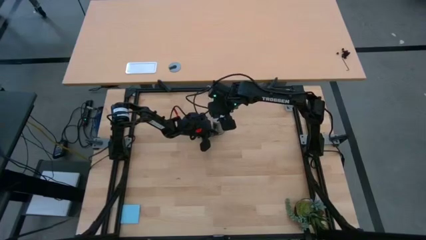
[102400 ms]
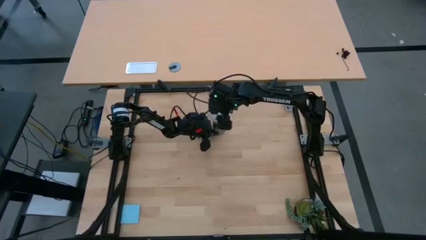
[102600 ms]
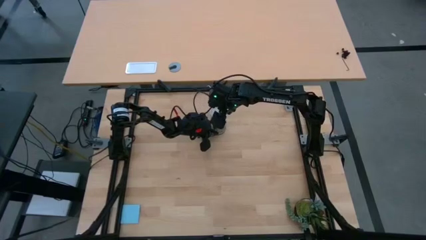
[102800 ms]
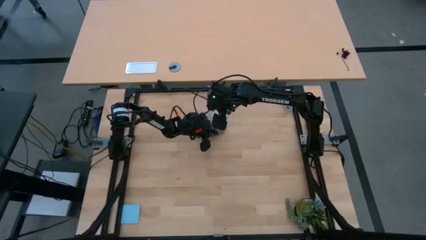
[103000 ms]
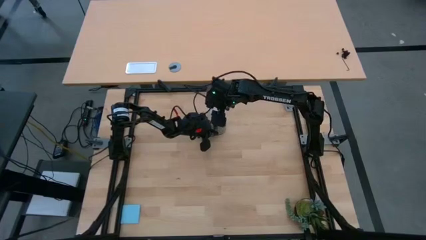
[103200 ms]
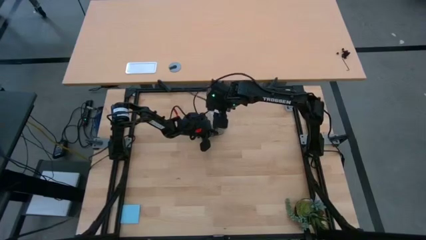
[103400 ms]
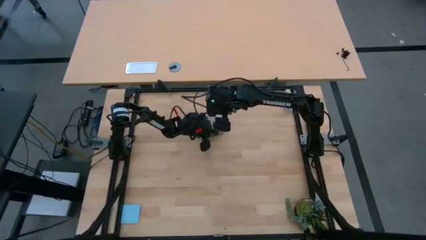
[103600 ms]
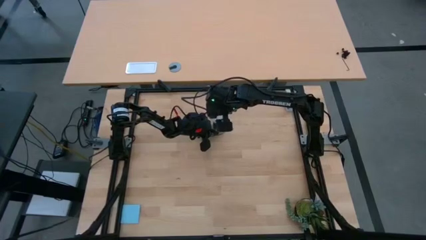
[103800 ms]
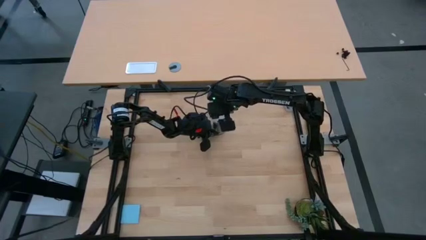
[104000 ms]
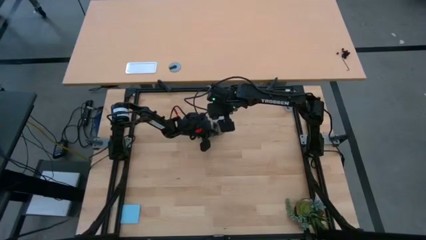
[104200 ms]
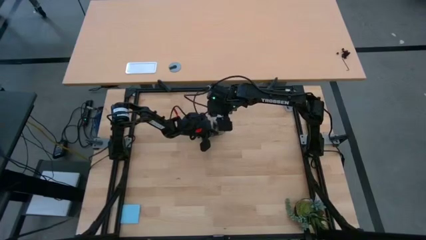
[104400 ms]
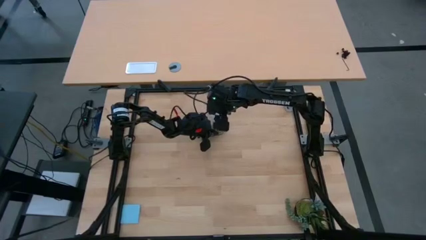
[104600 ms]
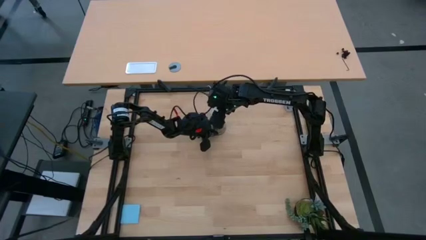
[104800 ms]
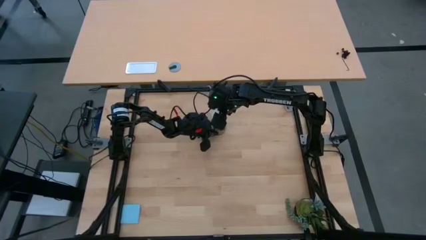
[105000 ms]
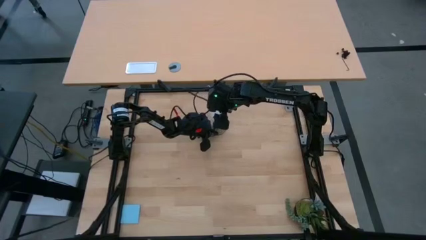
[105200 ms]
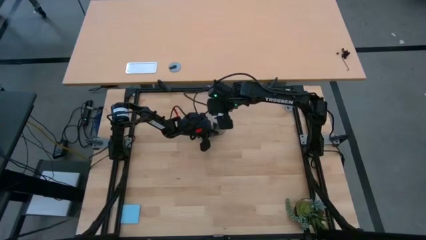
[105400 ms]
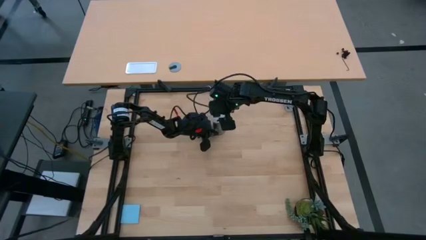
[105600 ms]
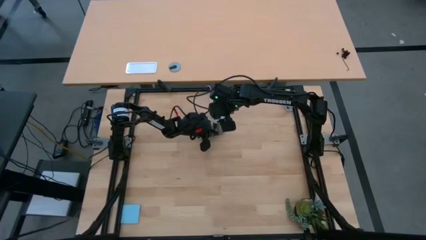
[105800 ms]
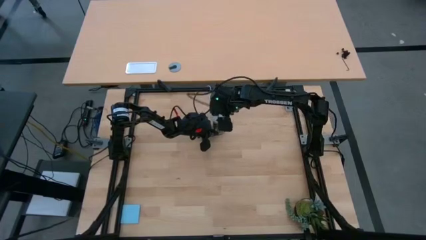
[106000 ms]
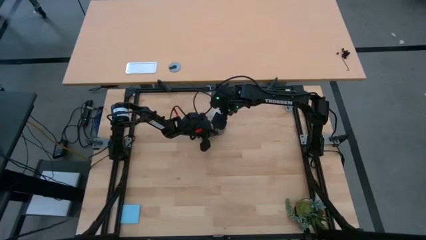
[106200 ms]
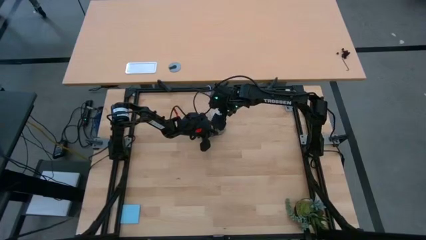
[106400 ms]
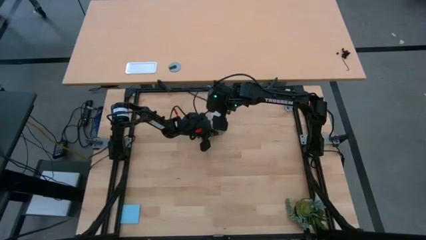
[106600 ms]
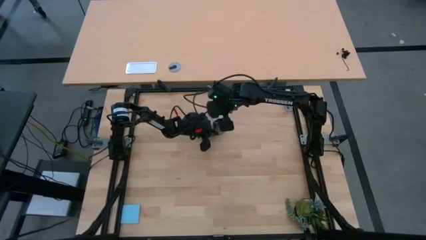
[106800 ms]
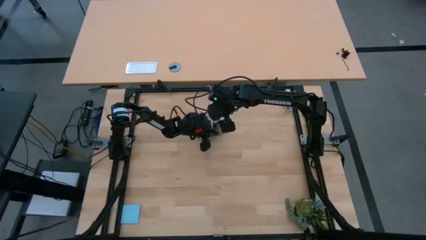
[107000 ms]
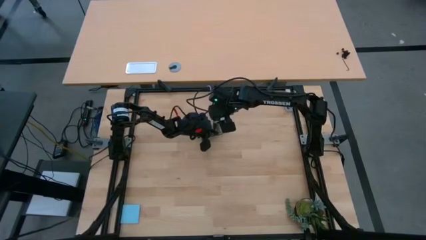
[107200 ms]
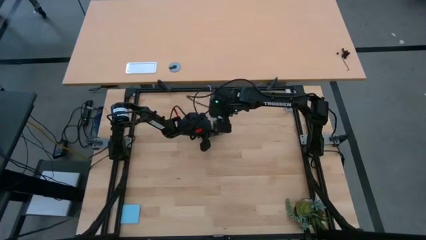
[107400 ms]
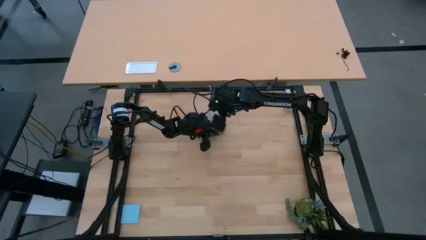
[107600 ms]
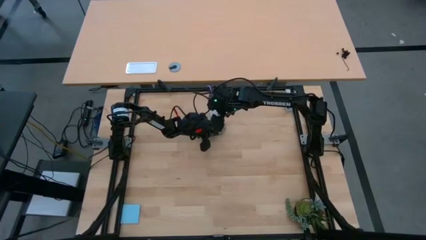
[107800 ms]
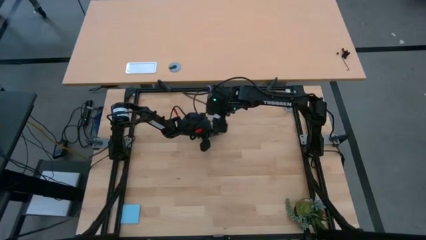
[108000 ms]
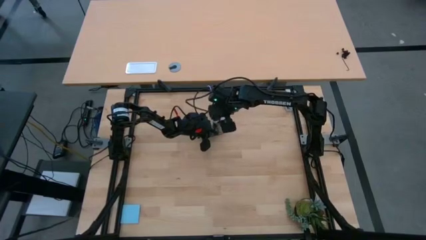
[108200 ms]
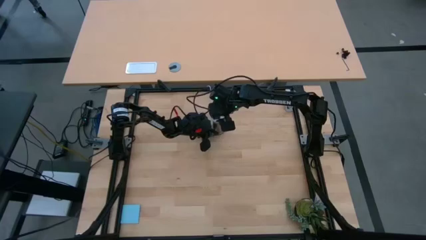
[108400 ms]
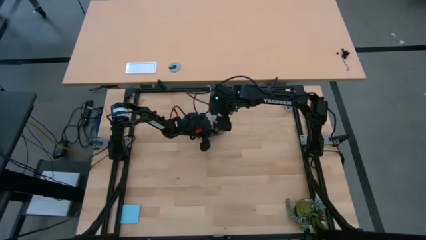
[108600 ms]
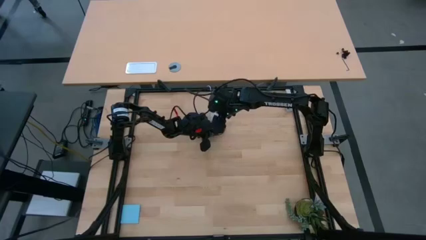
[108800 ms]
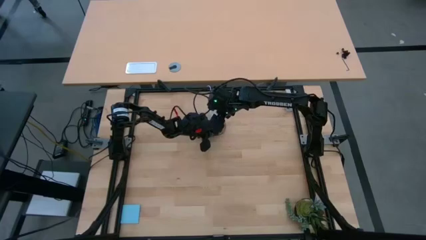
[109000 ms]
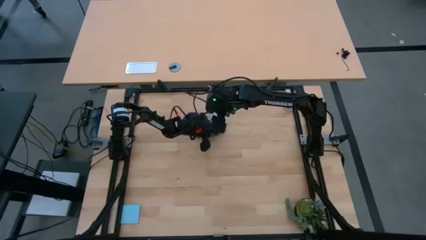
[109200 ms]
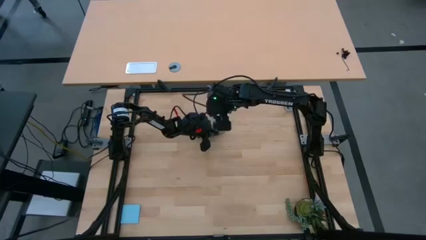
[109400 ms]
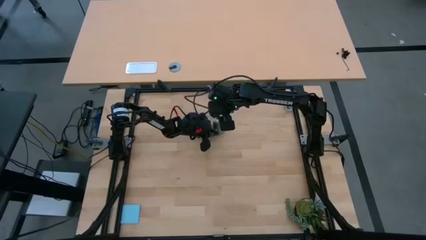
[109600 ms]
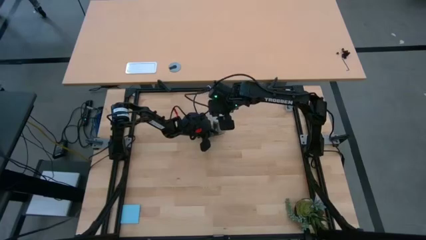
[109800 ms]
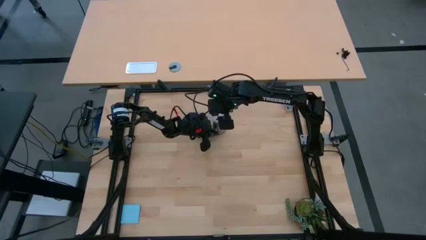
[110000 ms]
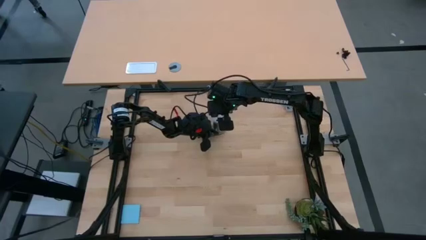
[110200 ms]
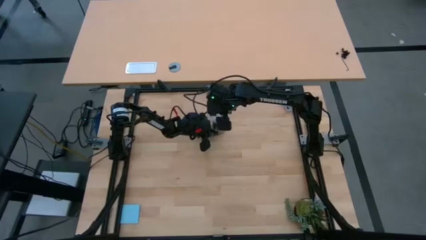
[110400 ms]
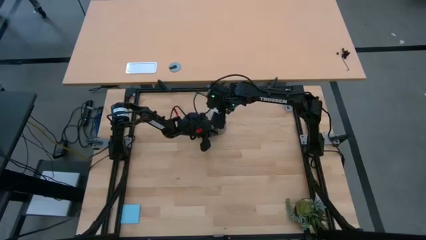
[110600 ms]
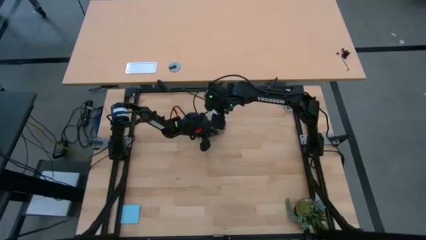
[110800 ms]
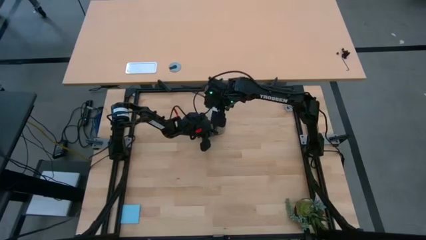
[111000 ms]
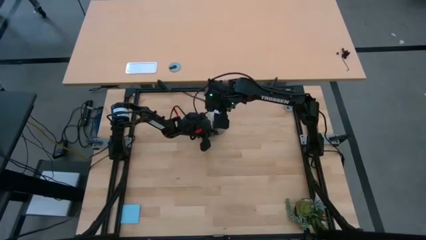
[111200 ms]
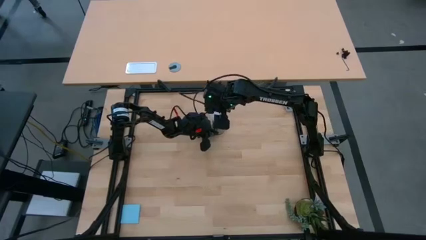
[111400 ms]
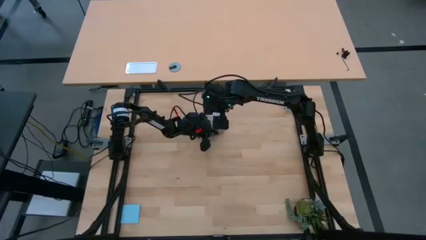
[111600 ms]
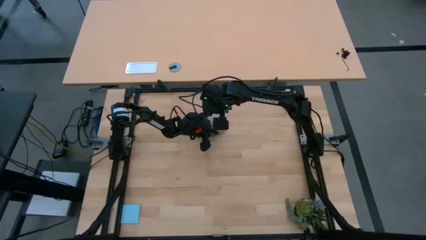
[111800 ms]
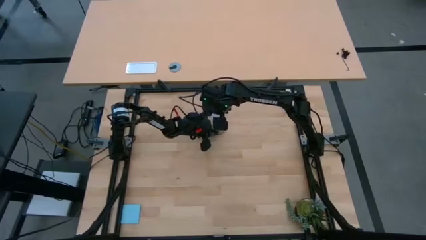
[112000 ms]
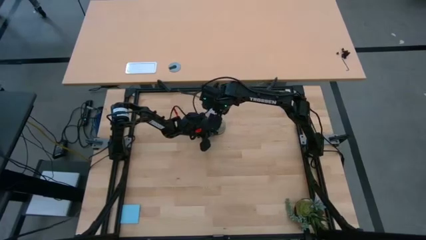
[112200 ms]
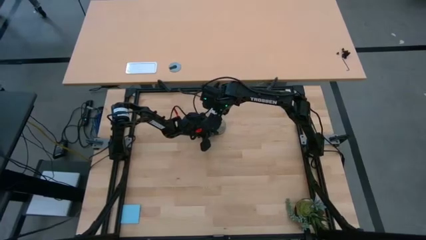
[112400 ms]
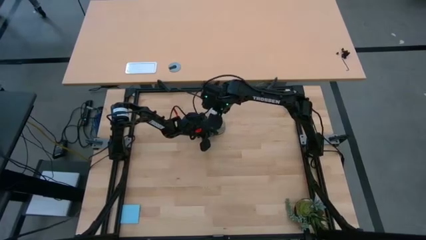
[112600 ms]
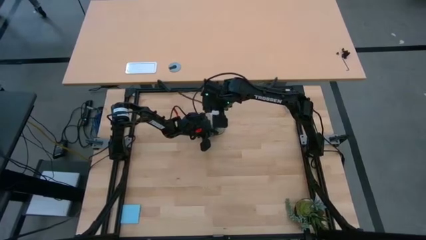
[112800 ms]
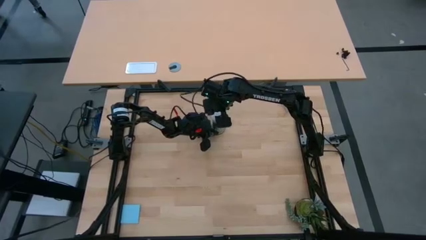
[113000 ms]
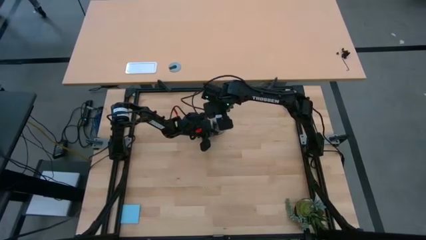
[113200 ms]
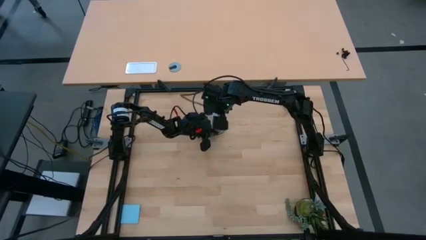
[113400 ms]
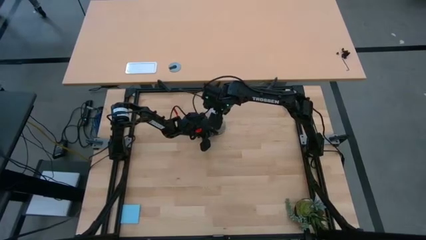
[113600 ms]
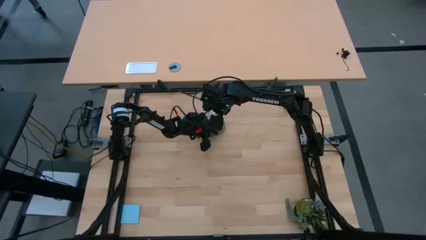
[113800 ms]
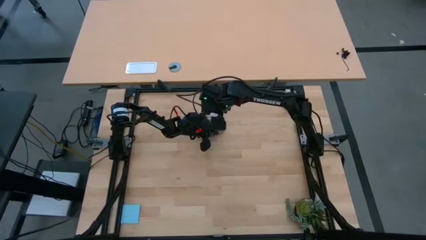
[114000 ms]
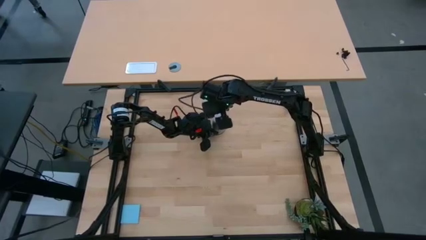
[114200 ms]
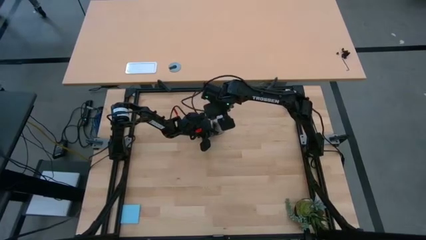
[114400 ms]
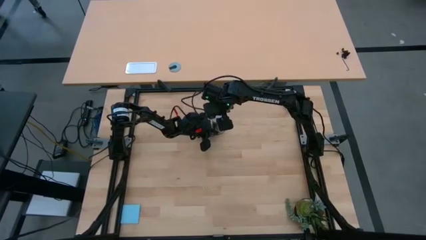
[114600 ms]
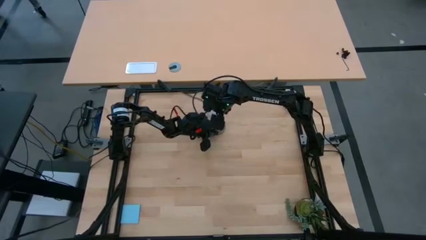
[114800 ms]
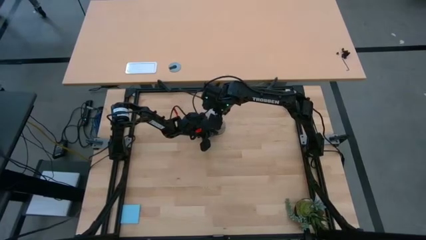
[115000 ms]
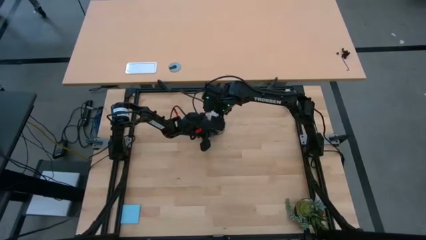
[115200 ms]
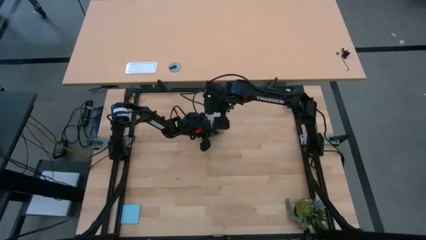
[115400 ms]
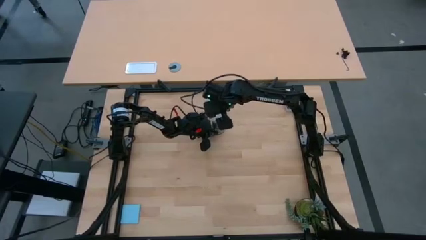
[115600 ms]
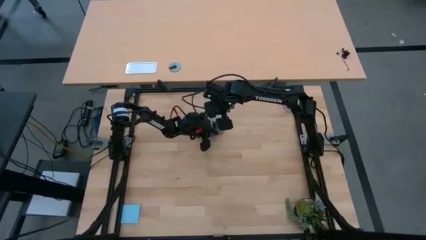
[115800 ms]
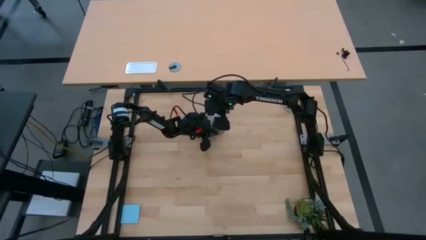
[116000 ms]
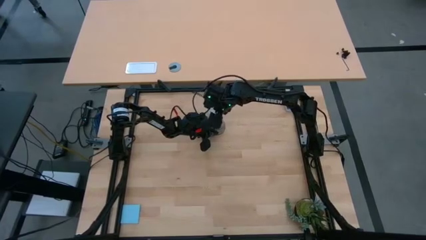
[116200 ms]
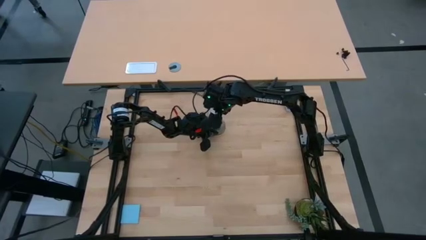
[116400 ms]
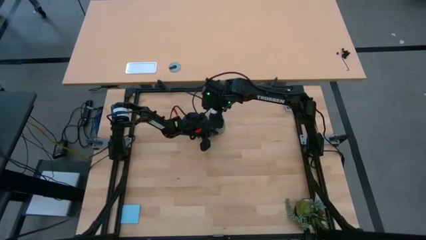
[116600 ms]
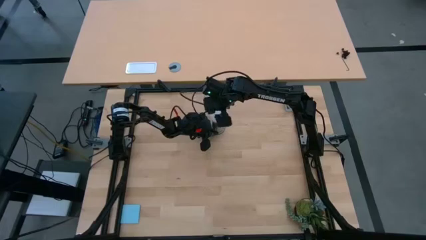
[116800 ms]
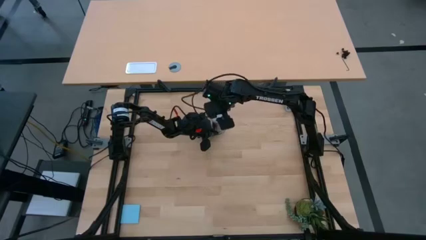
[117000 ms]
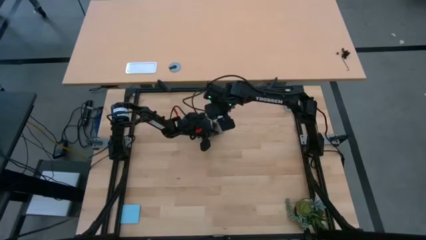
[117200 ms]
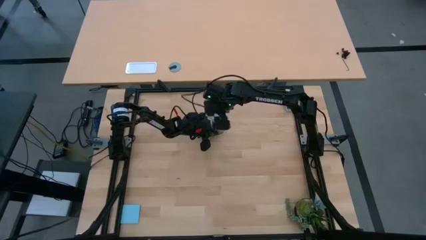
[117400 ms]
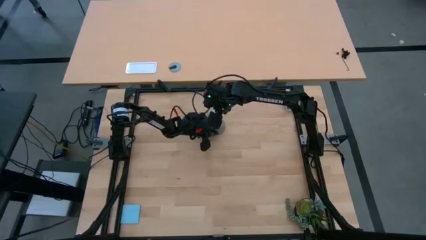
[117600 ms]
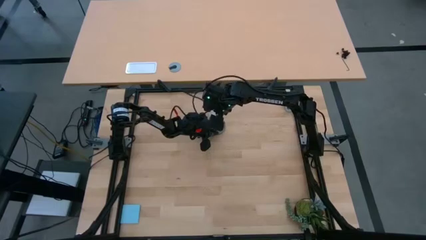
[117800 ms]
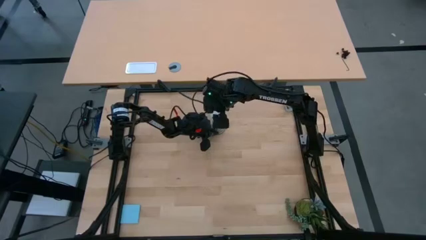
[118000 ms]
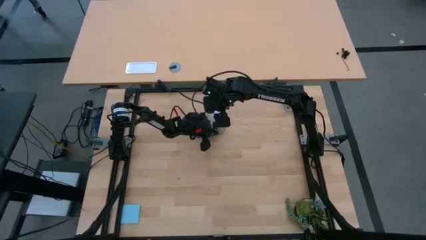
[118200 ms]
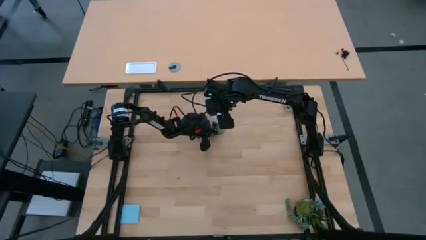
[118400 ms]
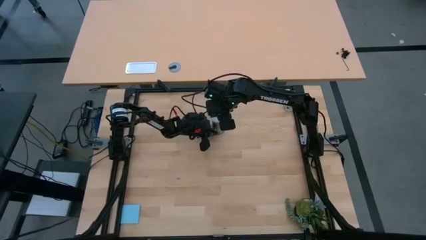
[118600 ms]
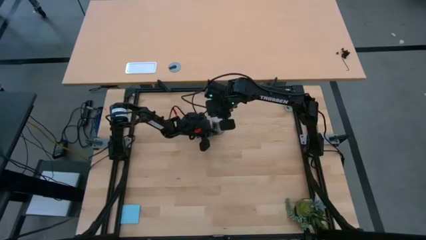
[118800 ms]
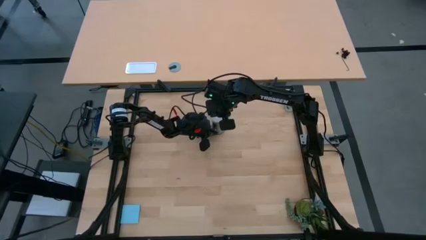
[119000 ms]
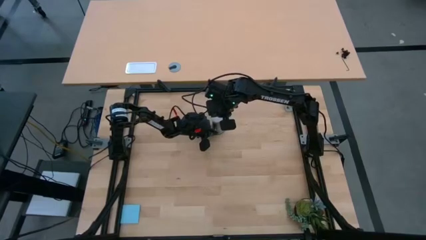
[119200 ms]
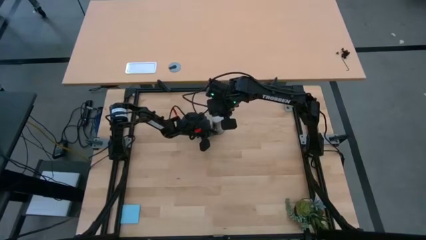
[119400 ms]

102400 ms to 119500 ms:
Task: Screw lightbulb
Insert the light bulb into the table lamp holder
